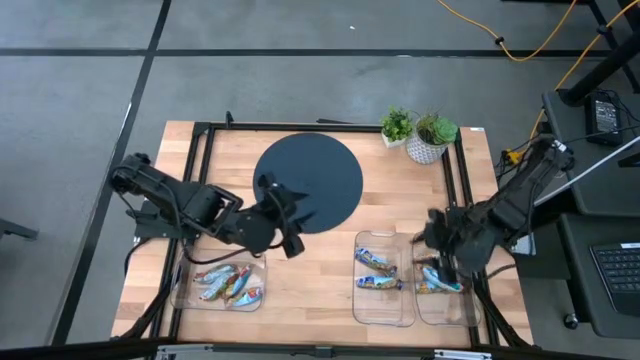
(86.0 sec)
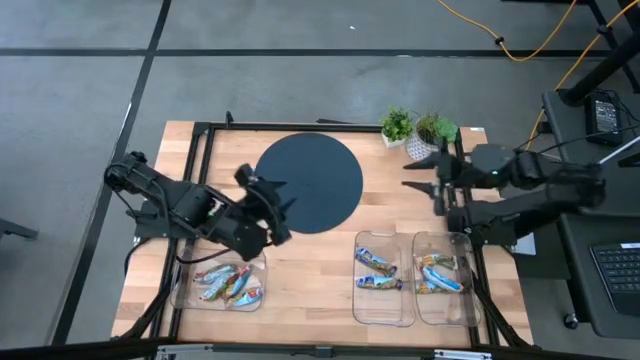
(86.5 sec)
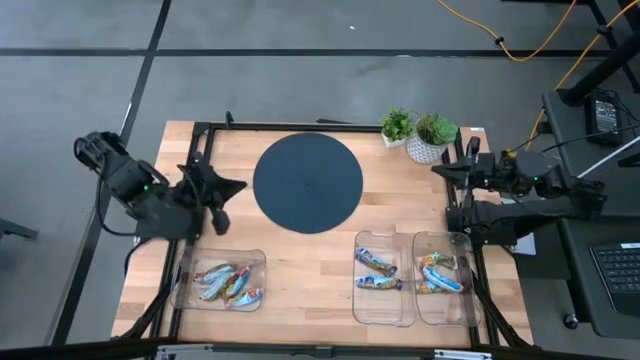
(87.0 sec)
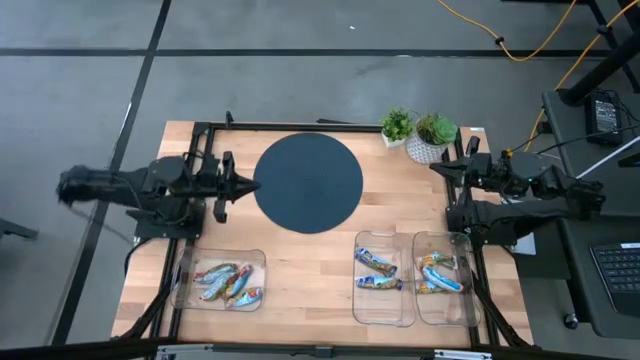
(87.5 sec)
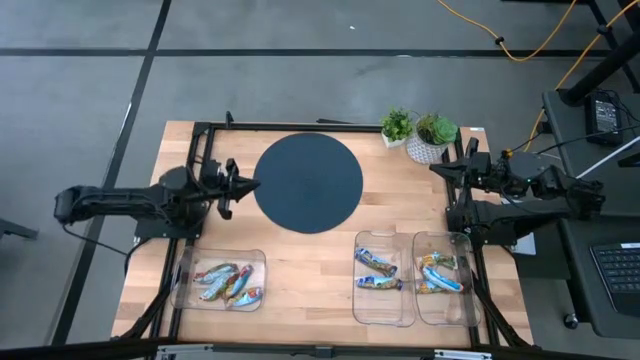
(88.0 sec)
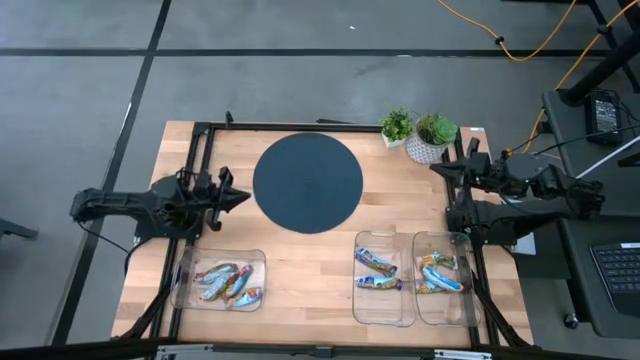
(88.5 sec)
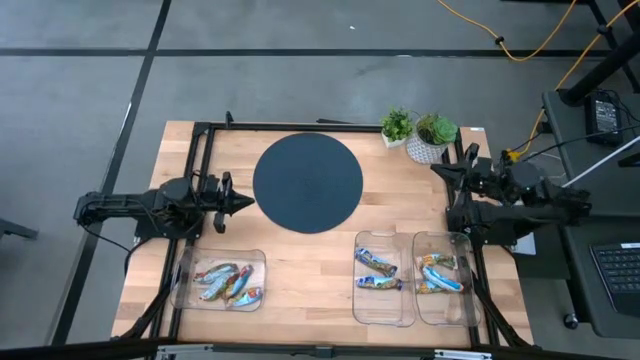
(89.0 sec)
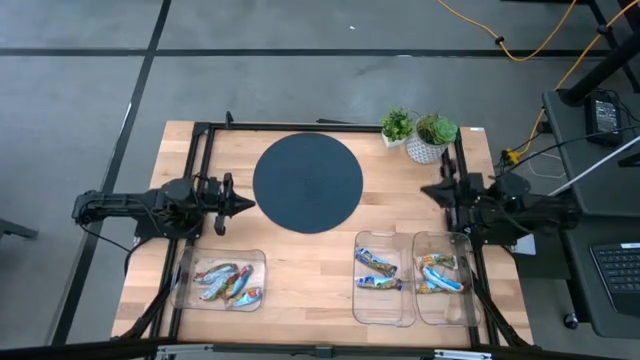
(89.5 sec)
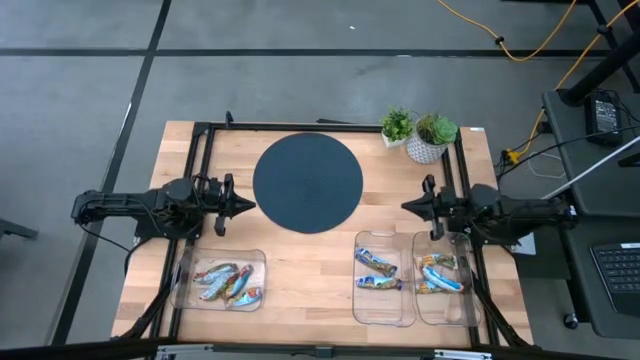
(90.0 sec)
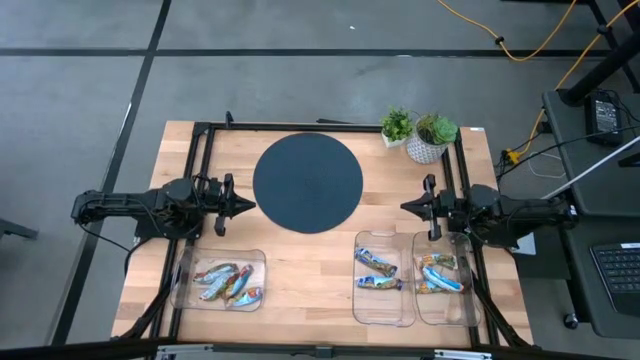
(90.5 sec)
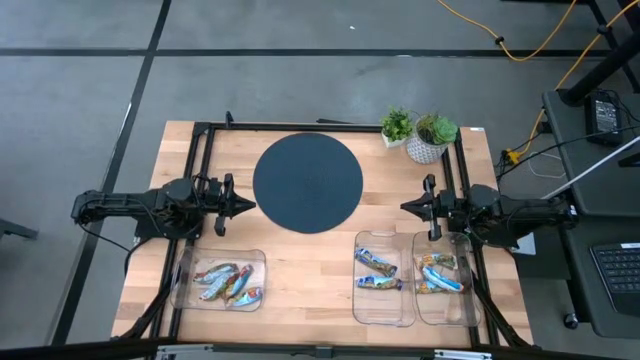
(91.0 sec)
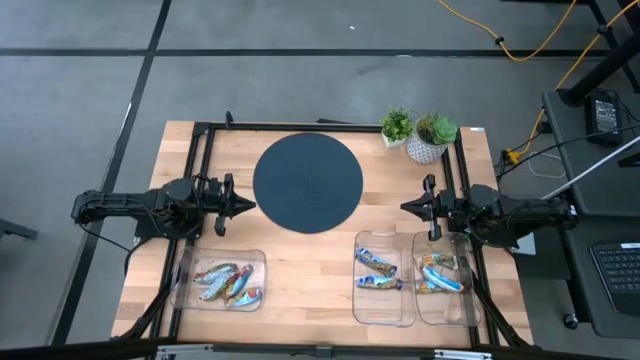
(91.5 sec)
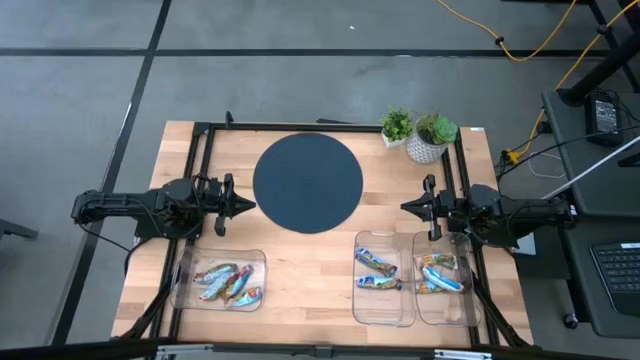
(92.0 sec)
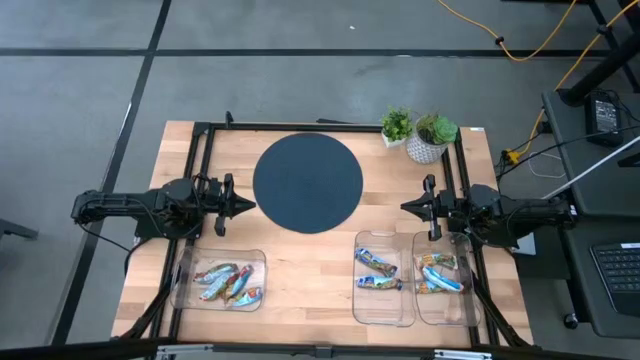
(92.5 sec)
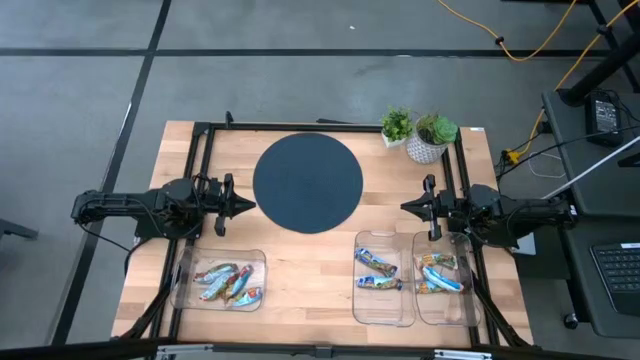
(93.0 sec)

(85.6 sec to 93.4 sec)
Task: Pick and place Granola Bars by type
Return to Home Position

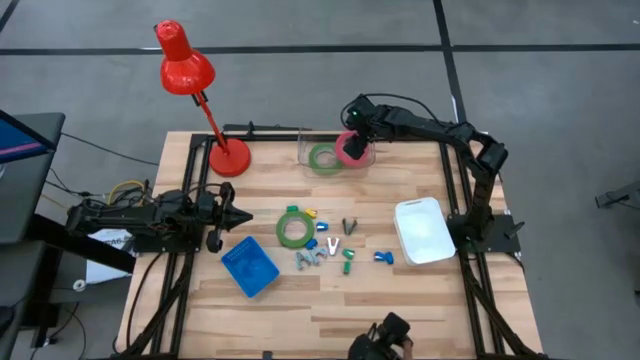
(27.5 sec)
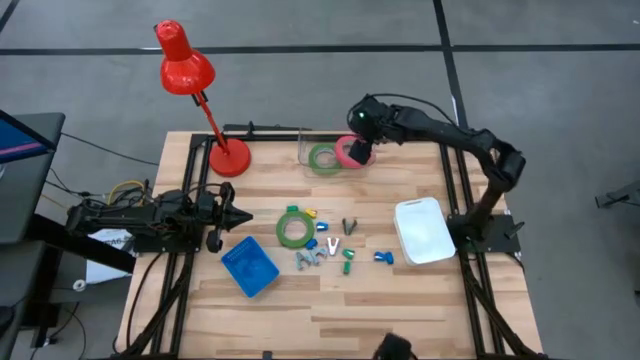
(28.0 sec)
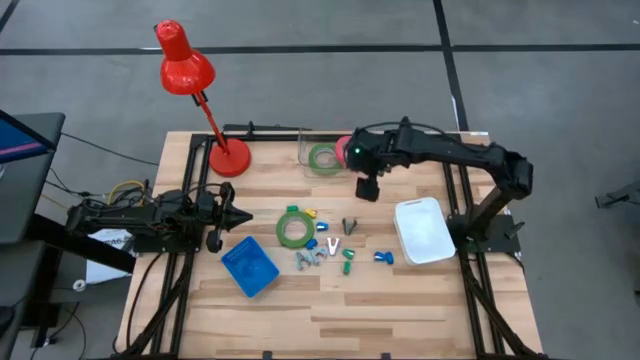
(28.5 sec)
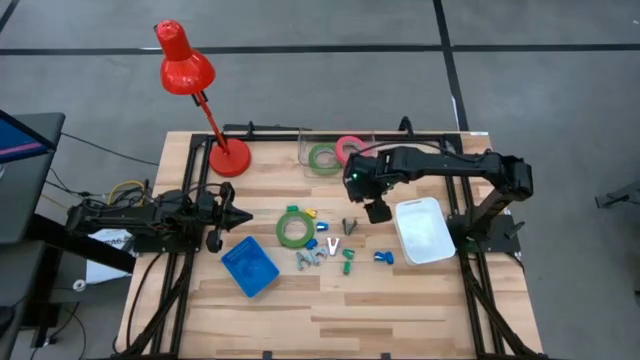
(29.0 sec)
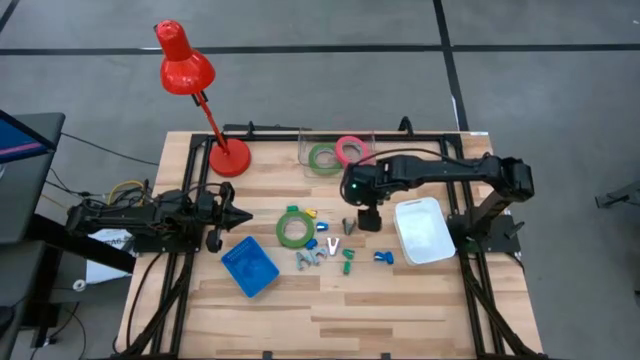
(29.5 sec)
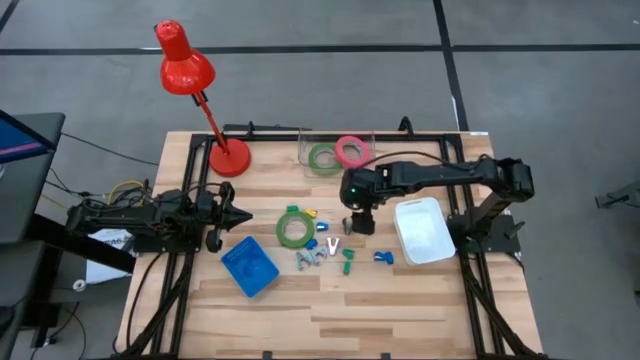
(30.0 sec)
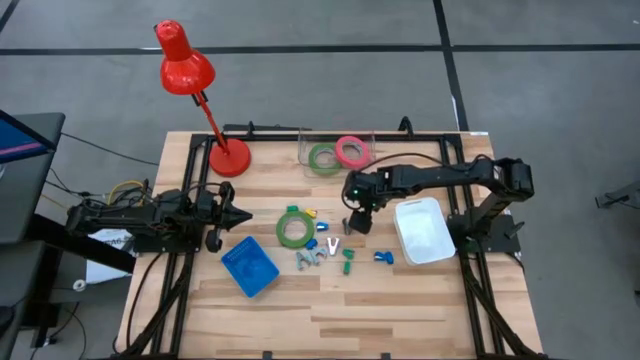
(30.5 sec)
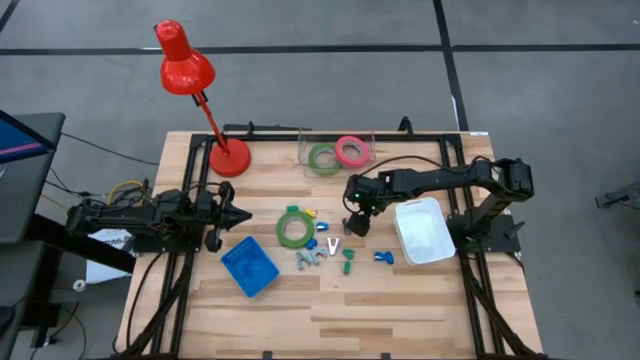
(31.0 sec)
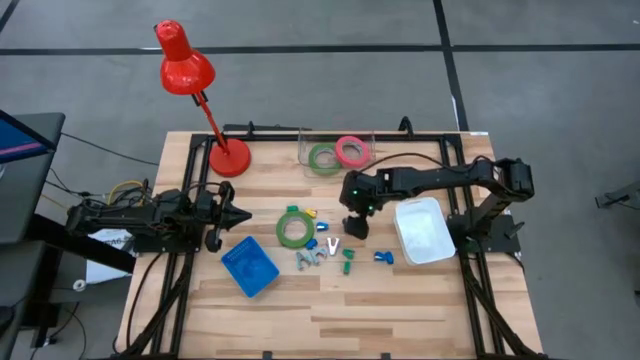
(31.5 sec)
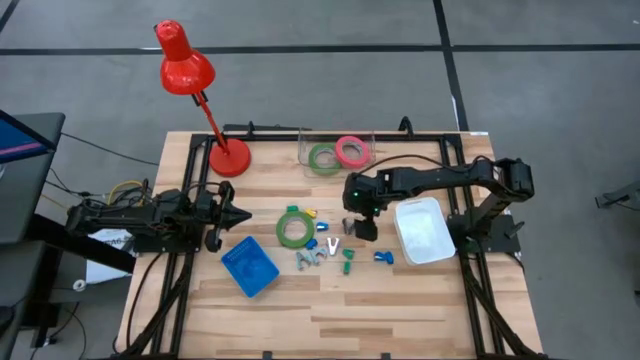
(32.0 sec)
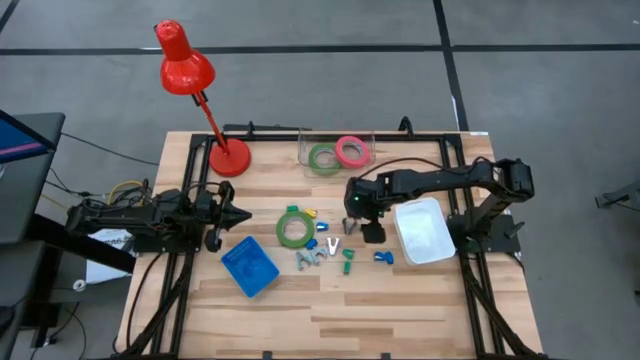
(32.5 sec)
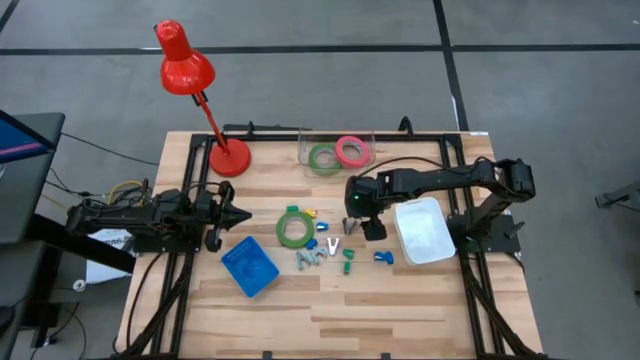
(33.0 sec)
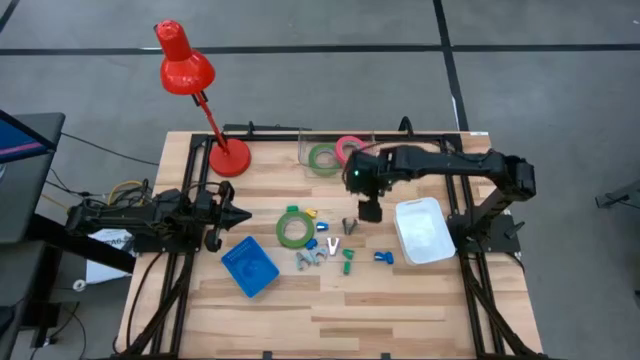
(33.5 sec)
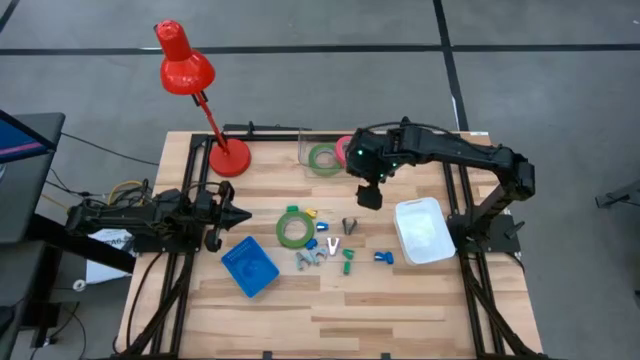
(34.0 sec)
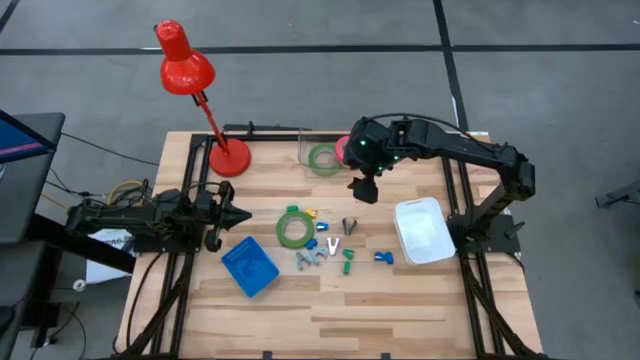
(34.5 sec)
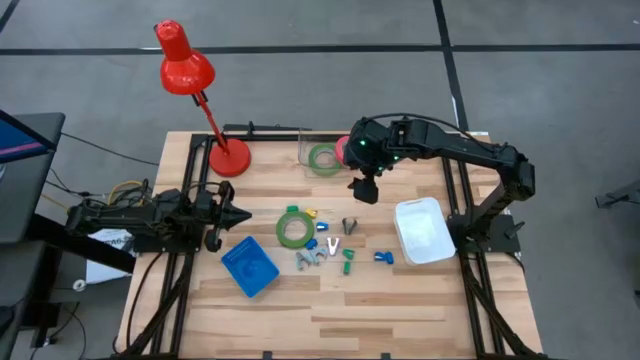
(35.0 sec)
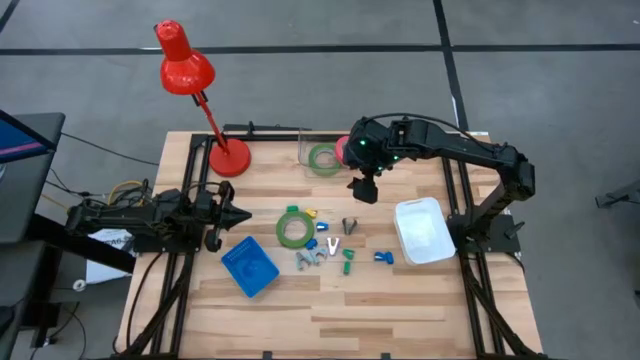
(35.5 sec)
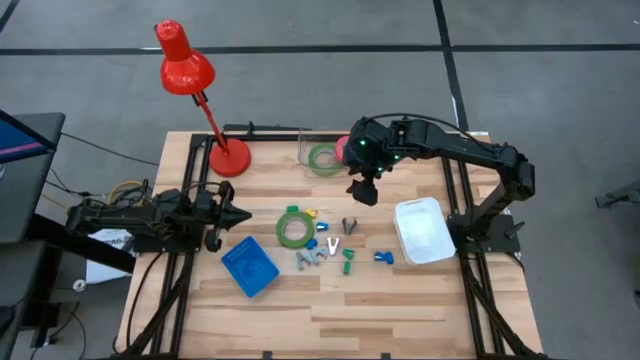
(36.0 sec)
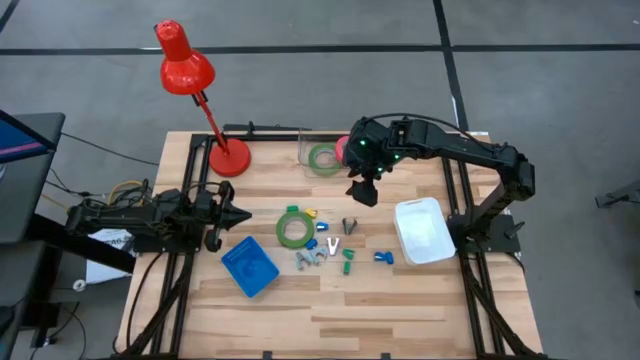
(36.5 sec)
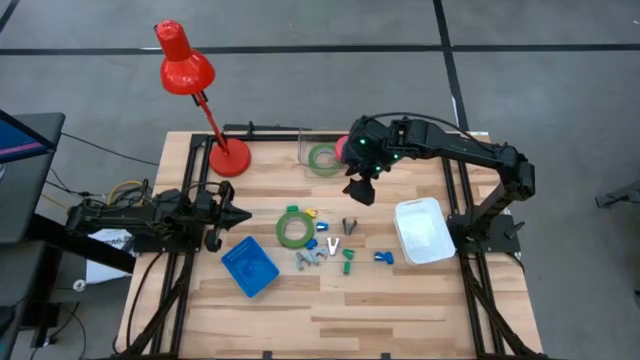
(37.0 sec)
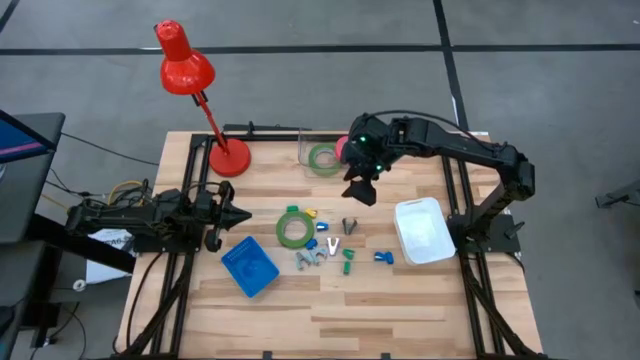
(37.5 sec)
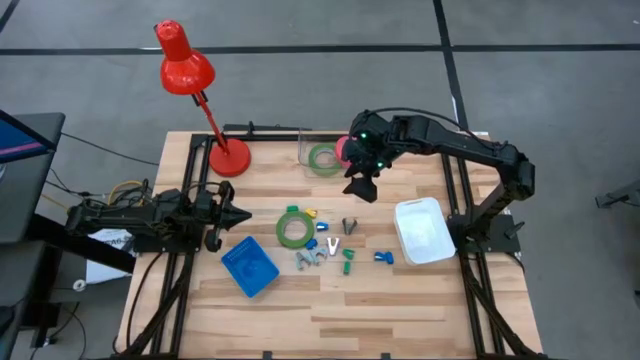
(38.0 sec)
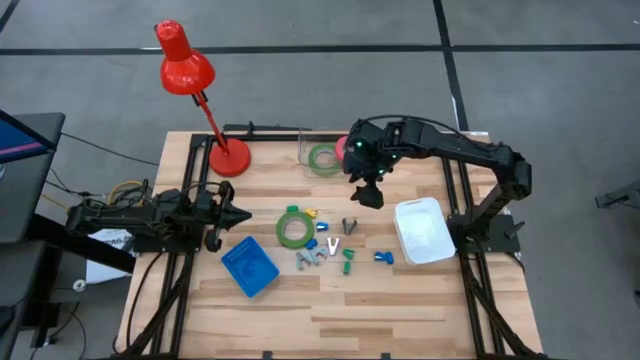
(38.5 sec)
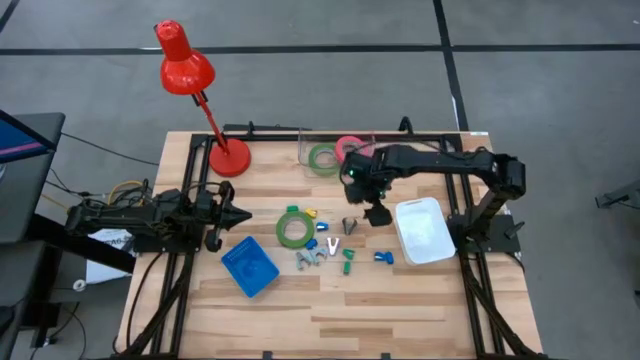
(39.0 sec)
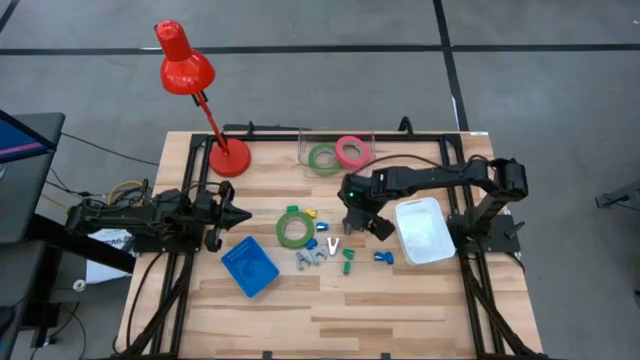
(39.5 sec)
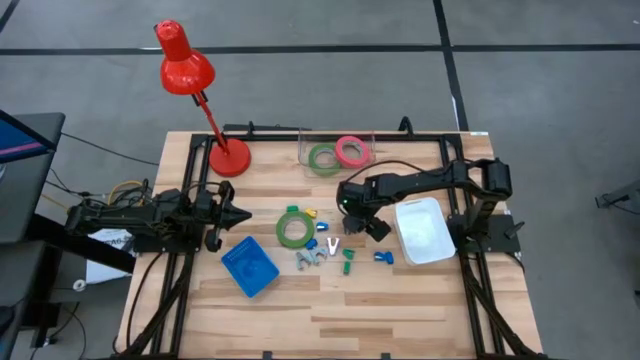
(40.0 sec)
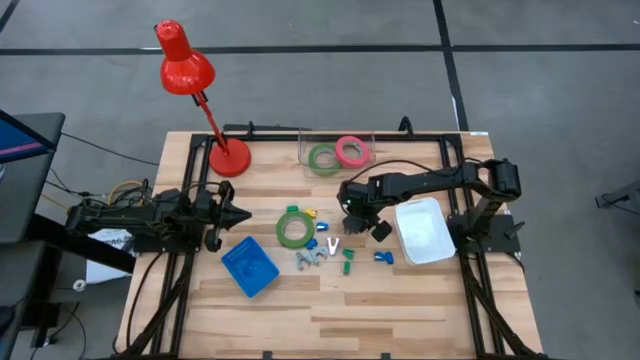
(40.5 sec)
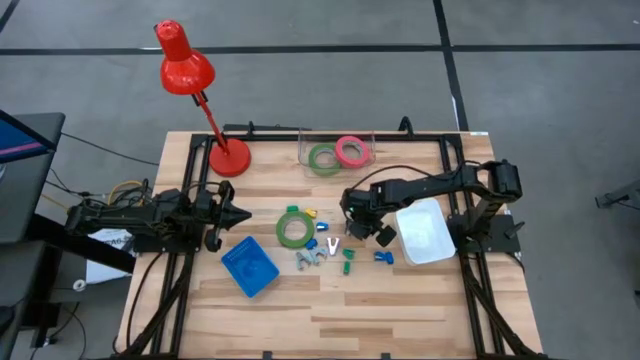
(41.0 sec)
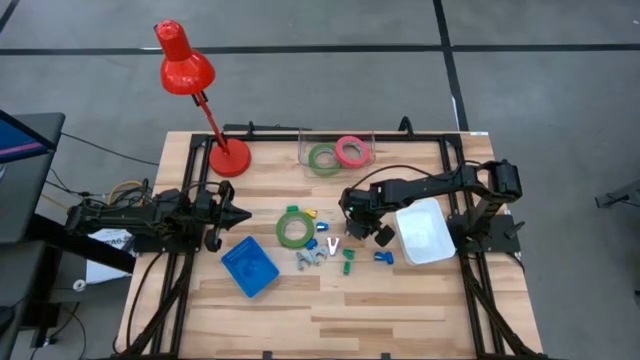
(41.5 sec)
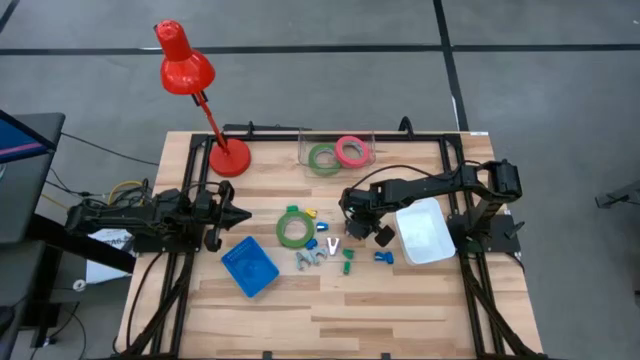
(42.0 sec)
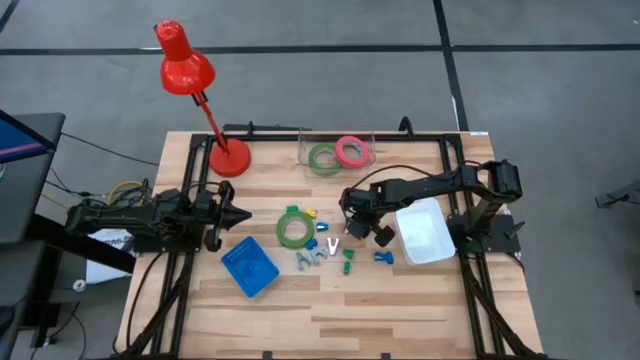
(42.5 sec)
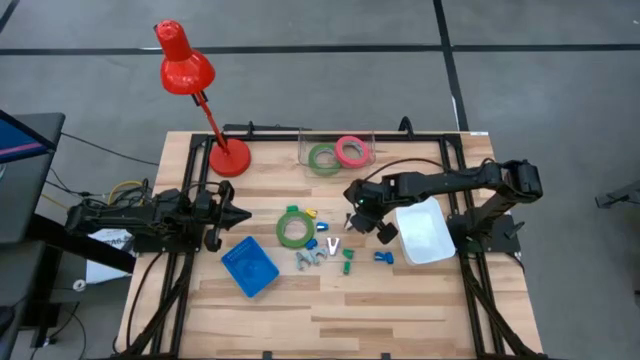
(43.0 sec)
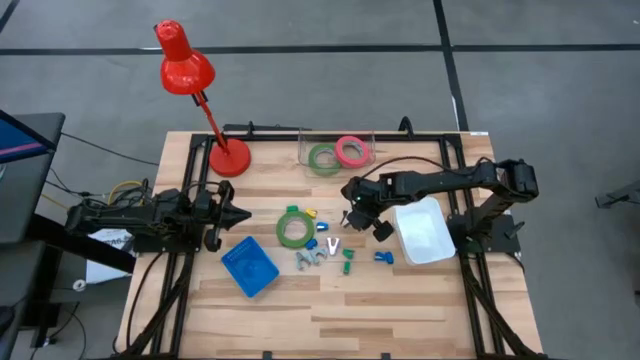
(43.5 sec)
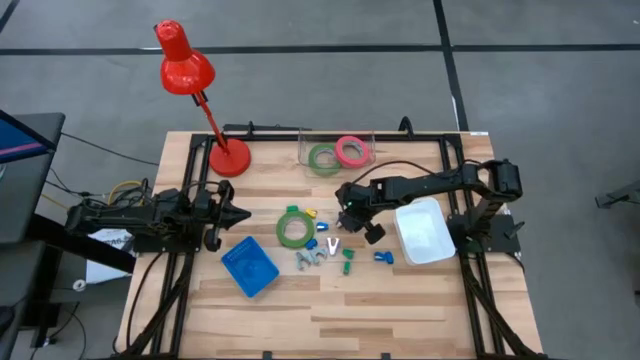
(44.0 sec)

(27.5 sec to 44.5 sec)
Task: Pick and place Stapler, Stapler remover, tape
Put the black stapler remover into the white bin
